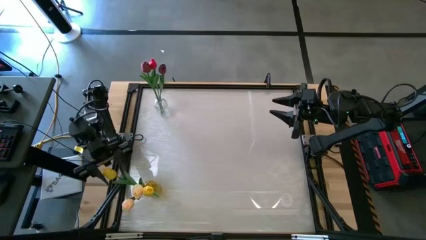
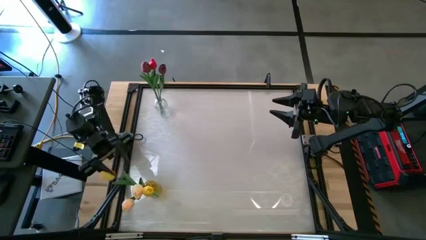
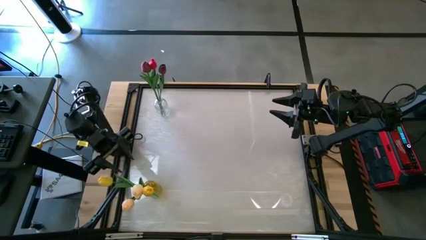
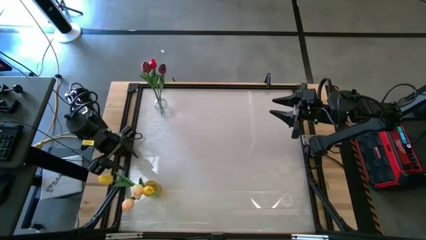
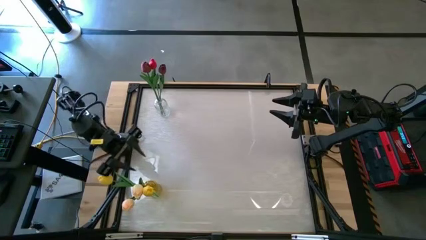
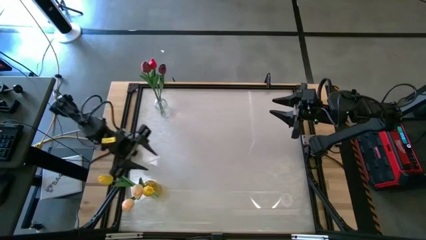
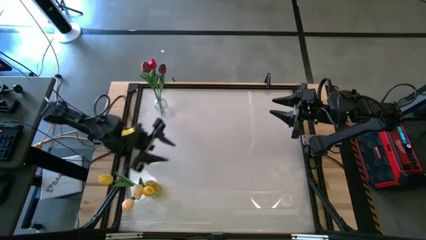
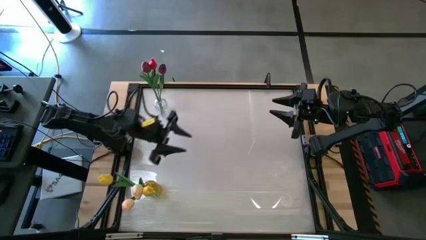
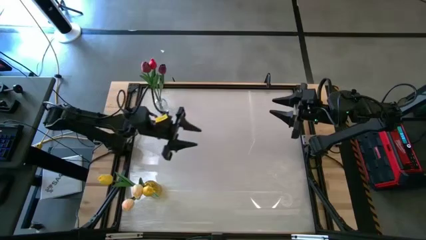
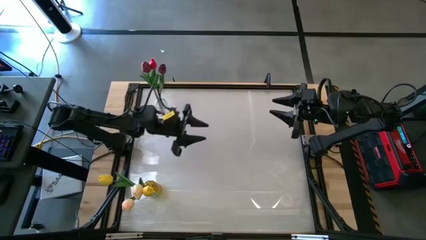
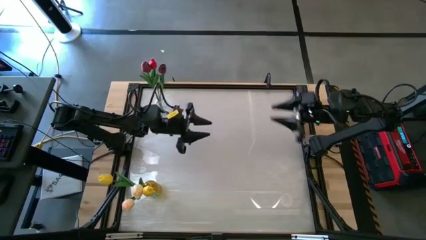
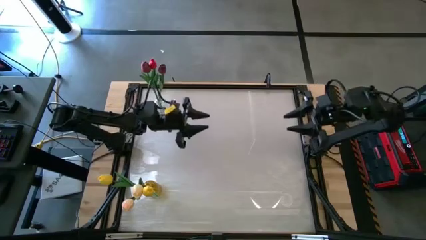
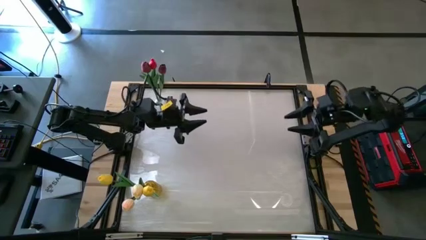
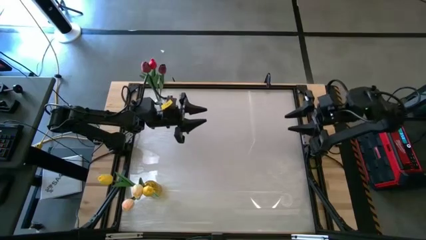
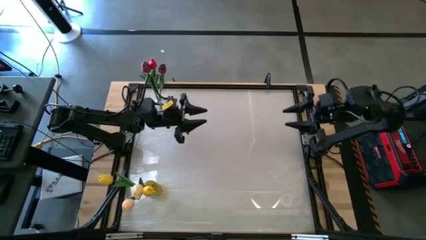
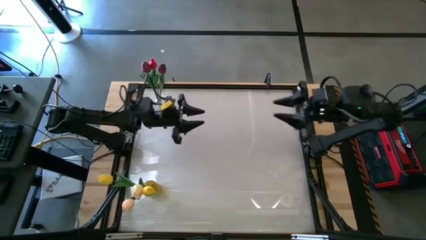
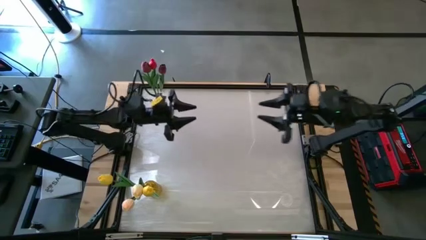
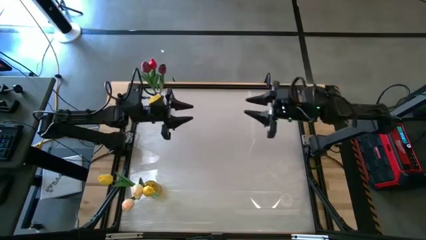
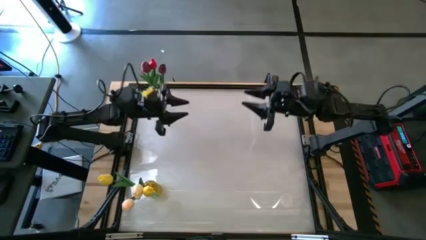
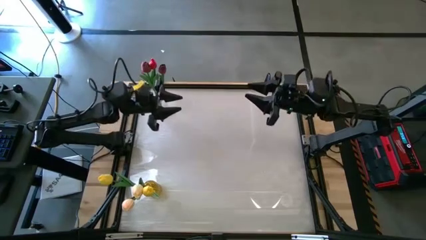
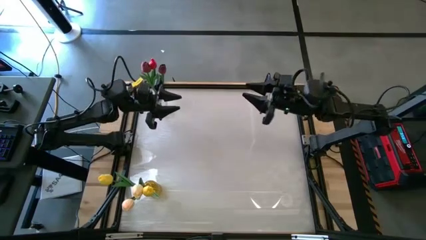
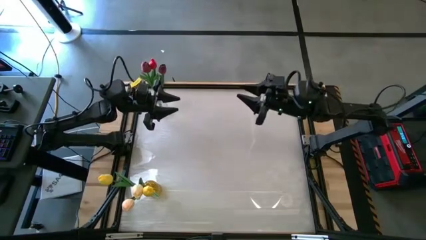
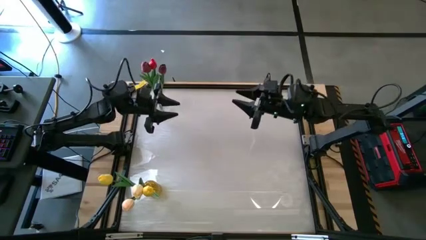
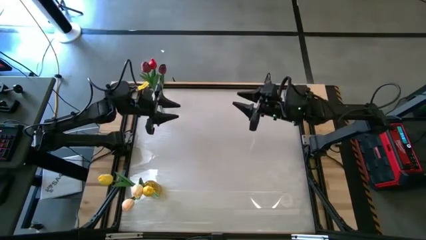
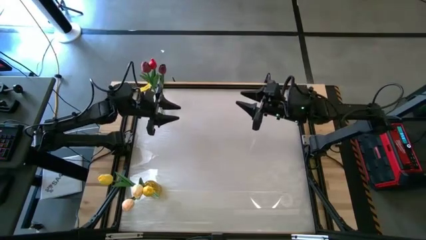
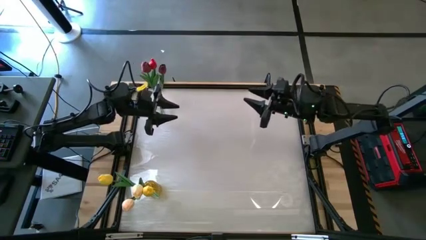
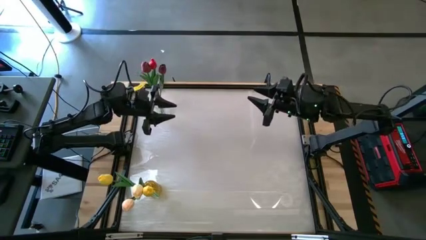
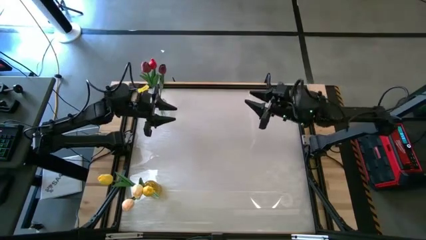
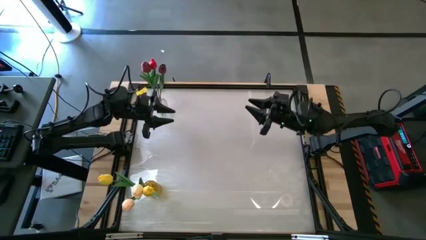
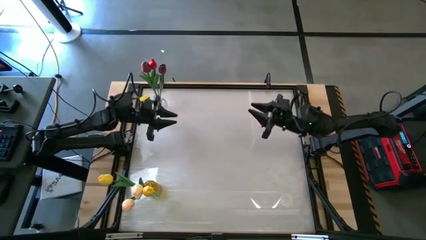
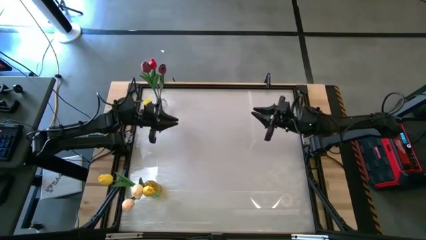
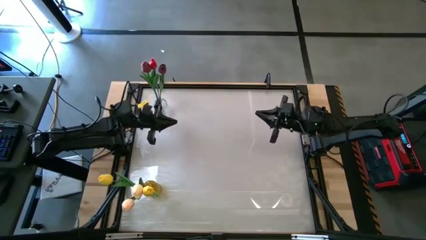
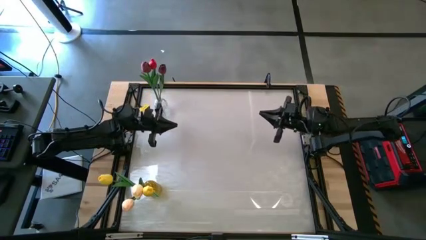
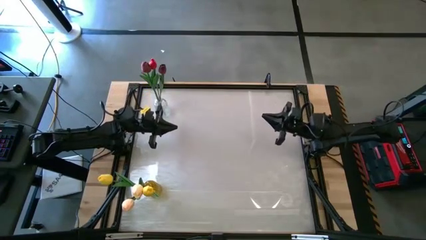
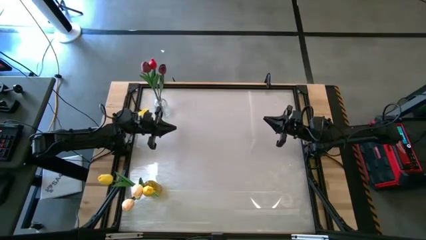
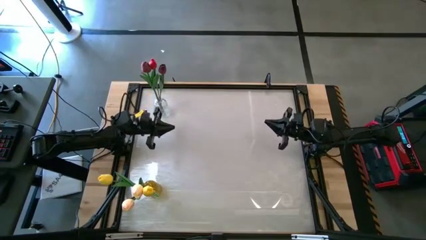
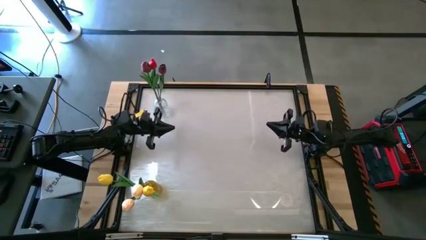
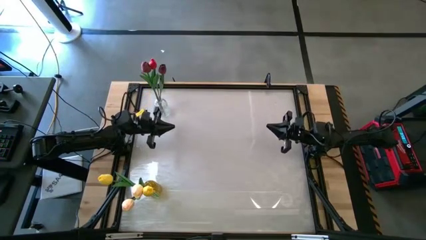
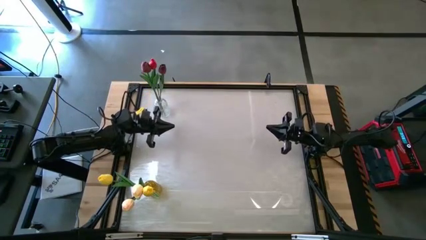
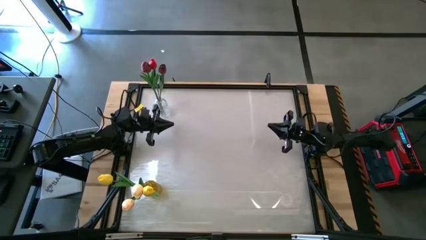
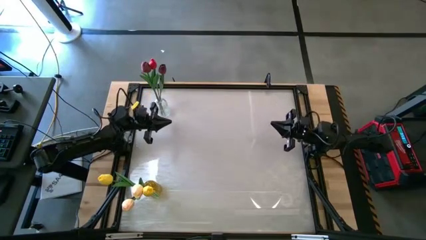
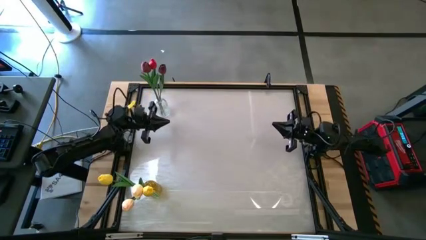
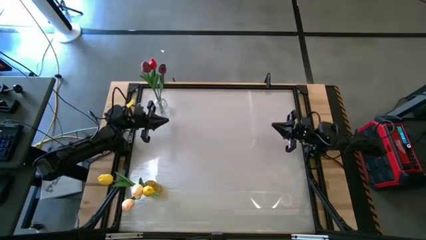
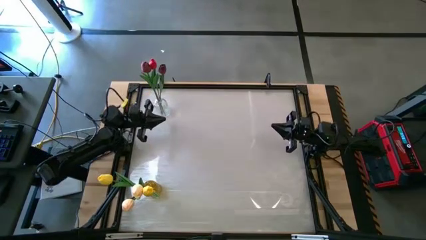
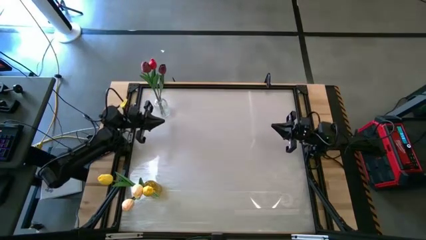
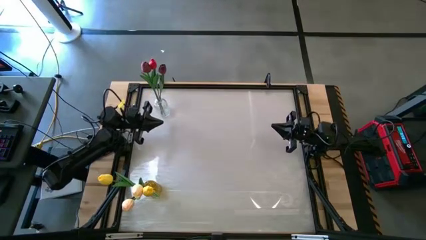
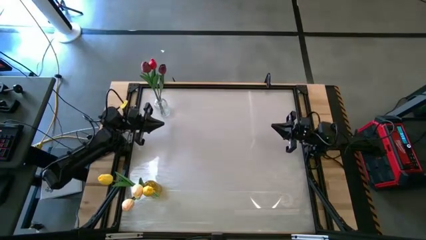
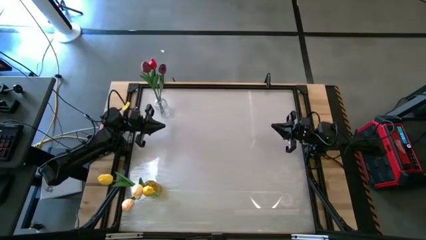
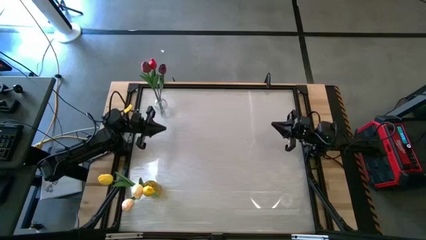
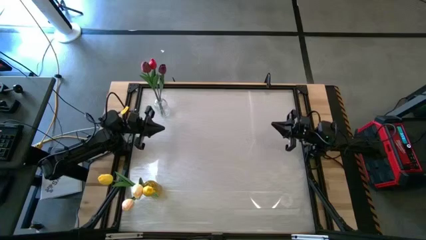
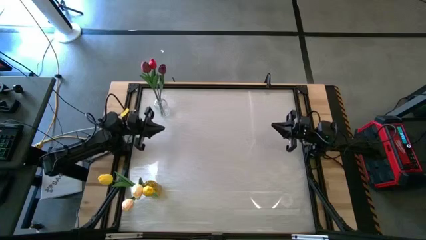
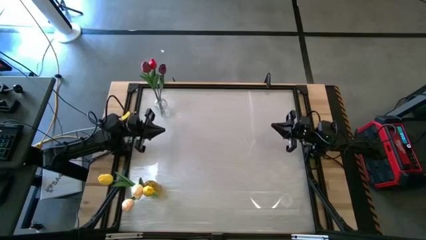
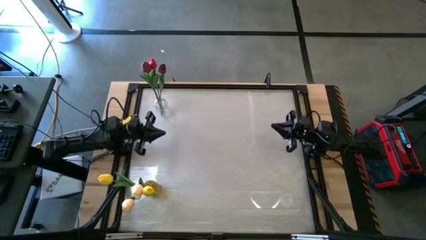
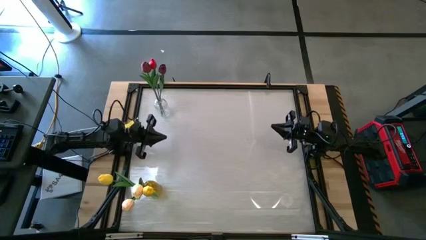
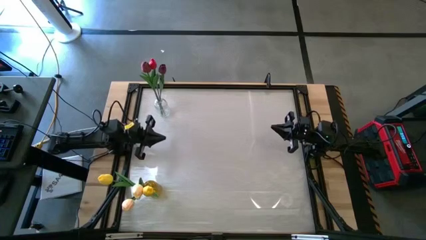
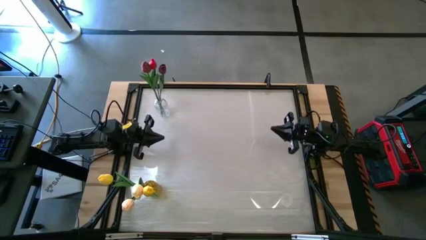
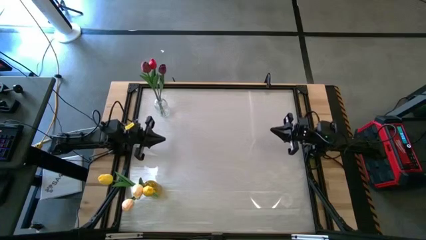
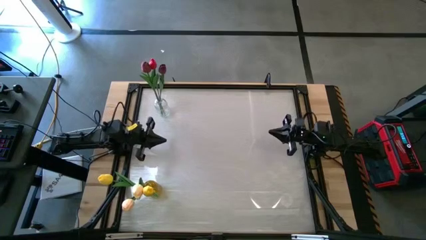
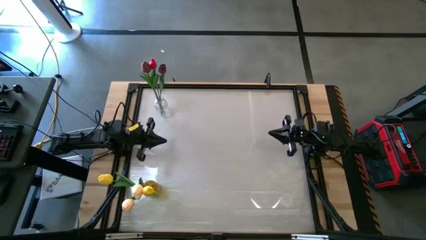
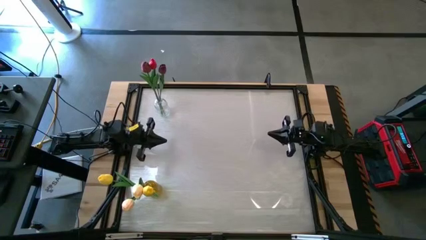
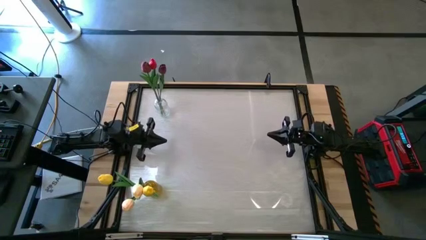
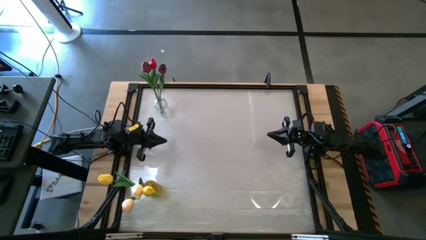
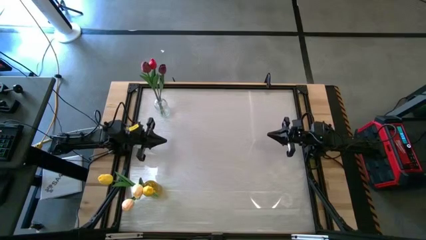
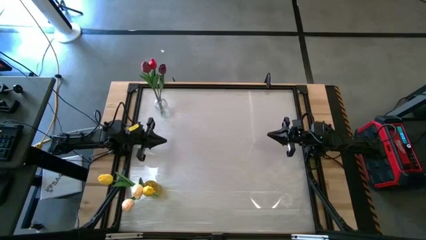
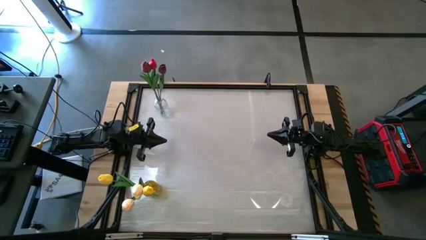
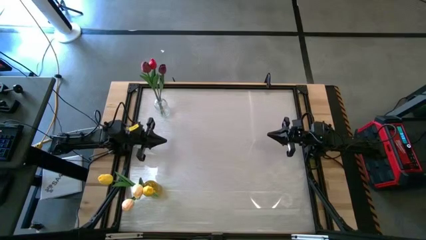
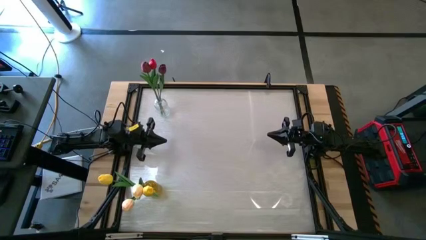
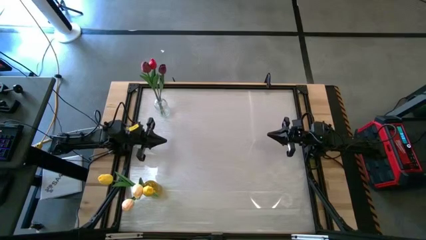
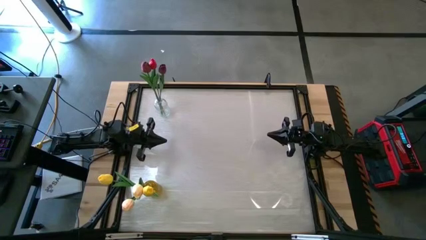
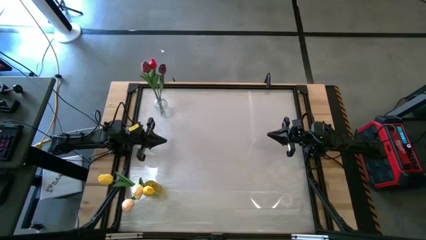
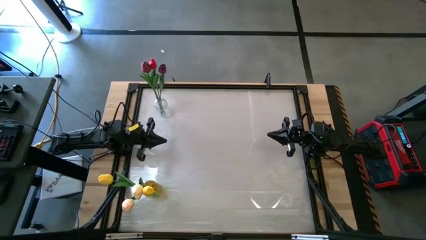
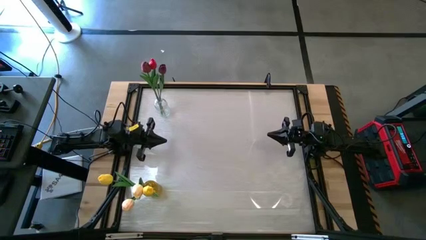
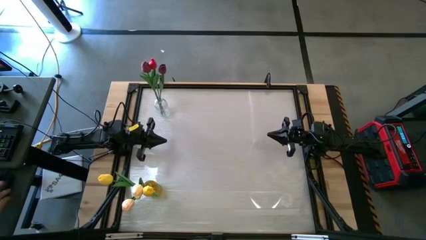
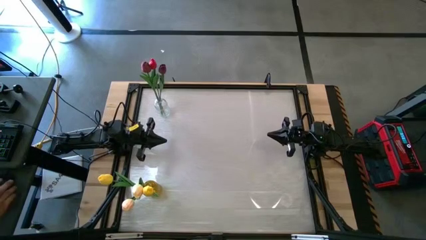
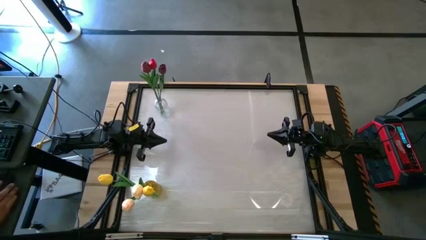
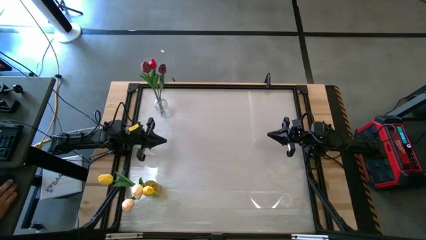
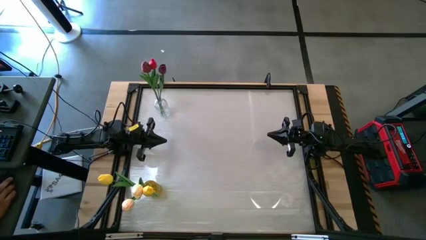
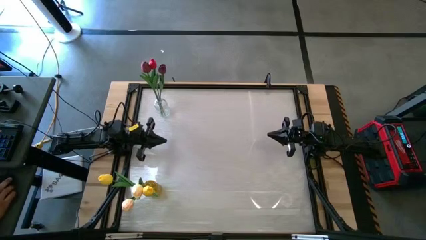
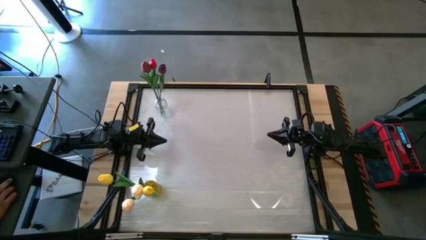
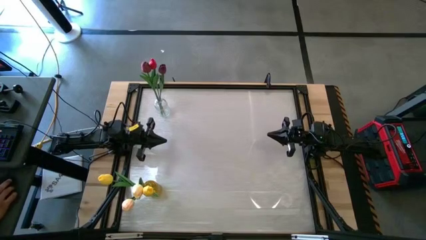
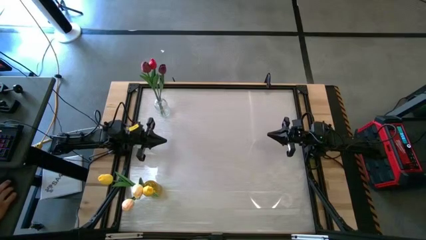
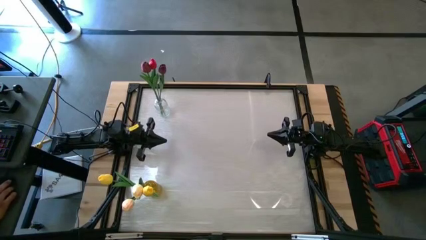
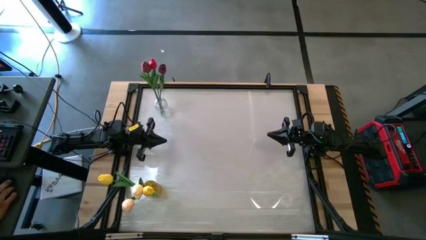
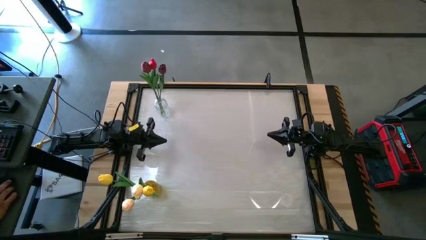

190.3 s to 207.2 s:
Task: Sort flowers into vase by color
Return to Home Position
